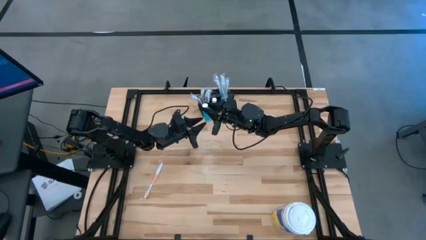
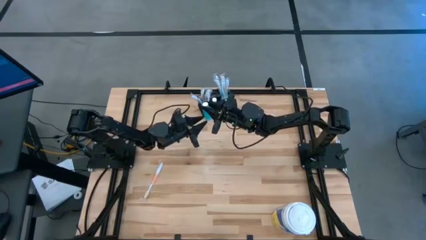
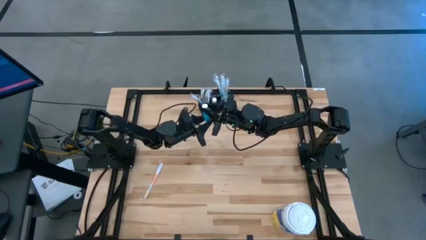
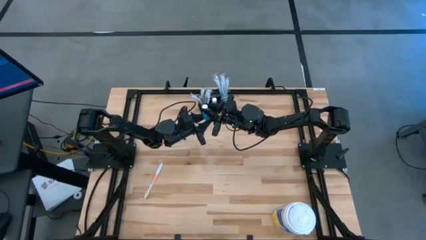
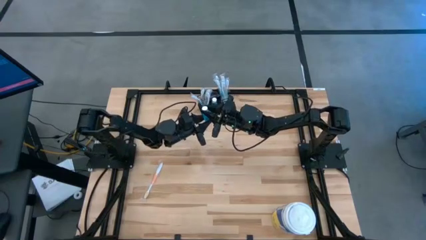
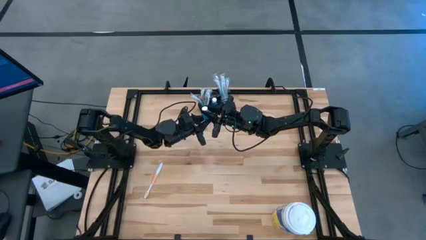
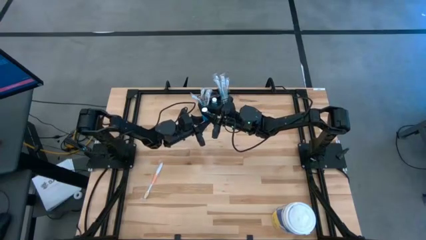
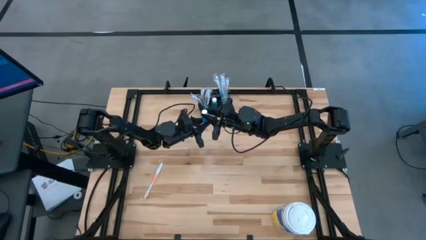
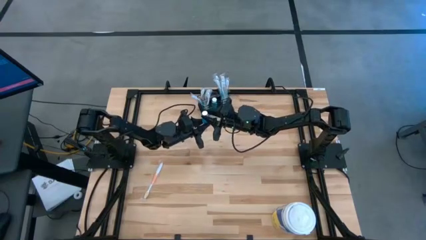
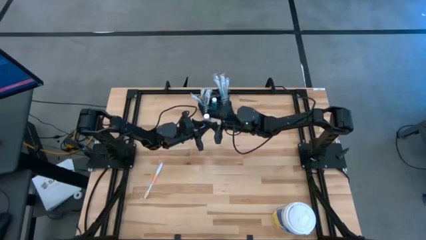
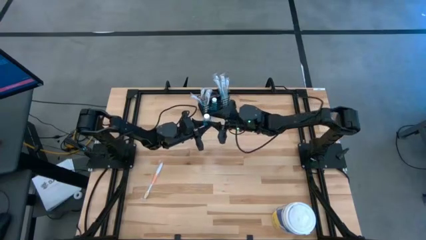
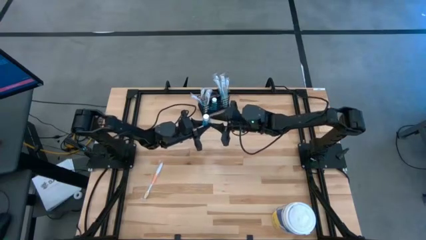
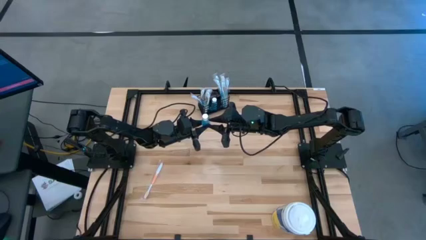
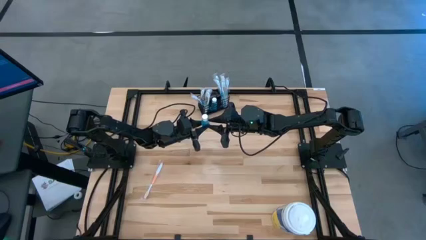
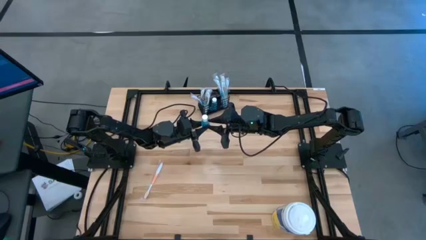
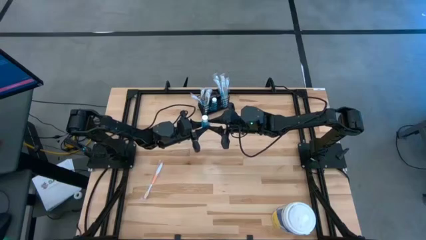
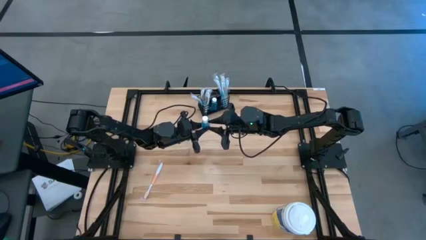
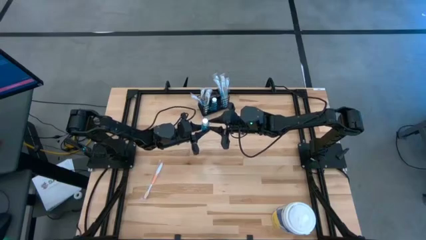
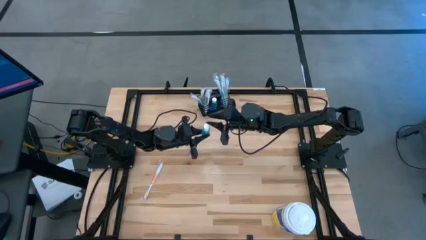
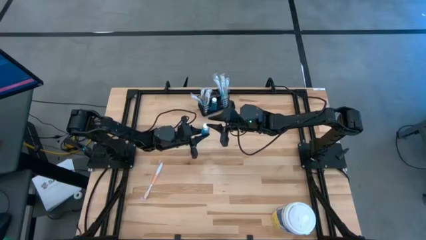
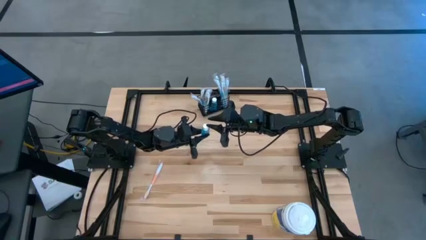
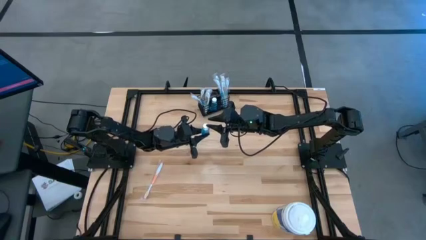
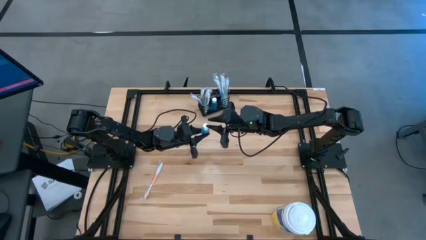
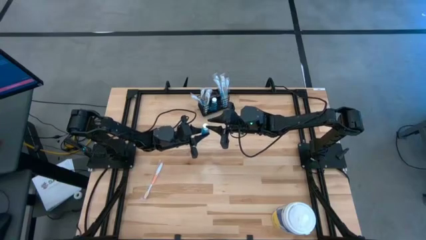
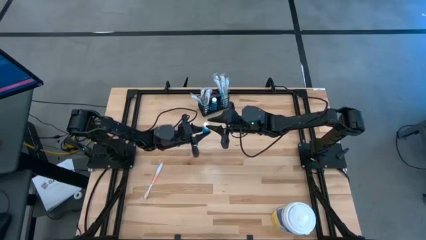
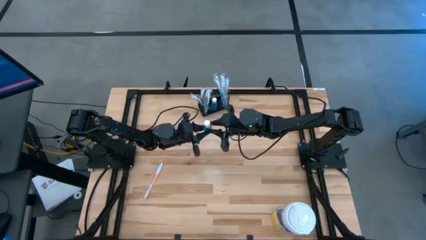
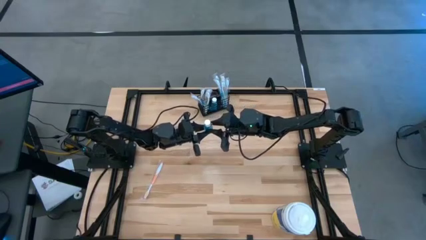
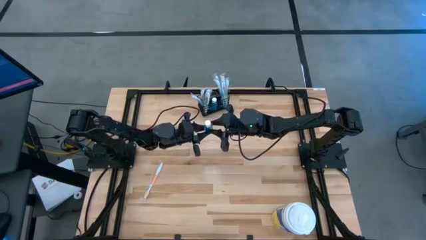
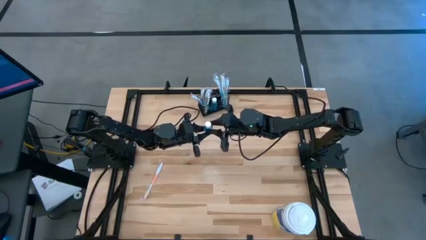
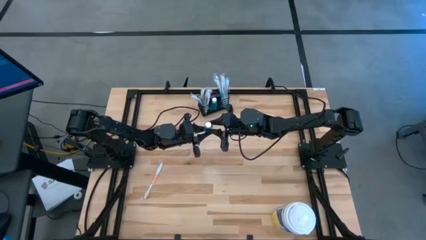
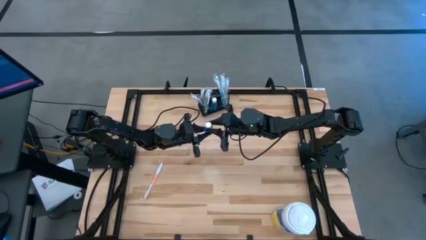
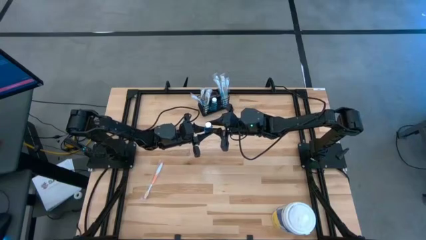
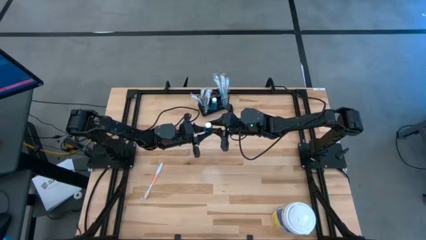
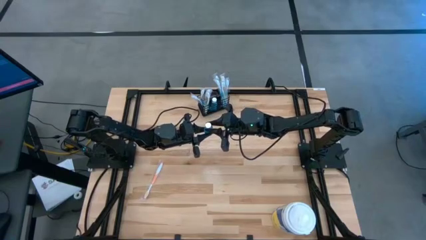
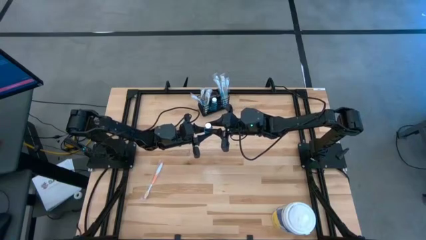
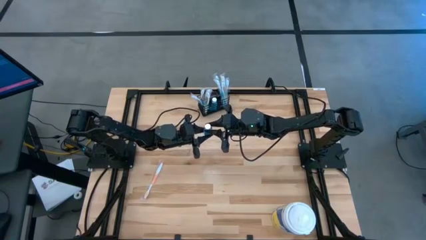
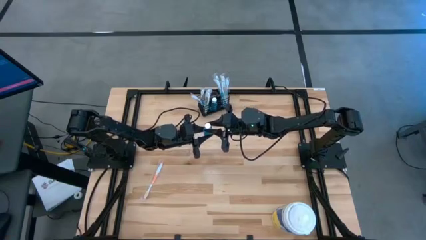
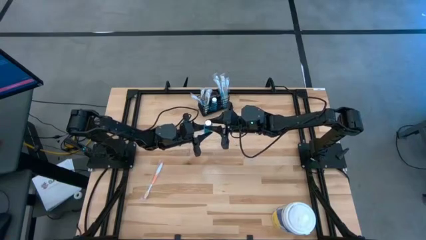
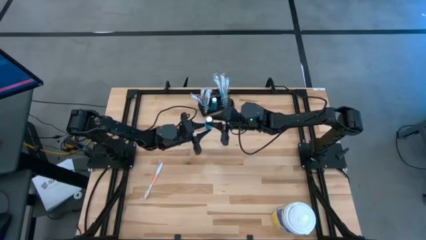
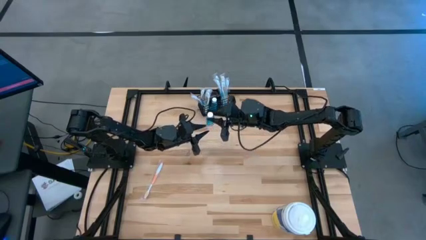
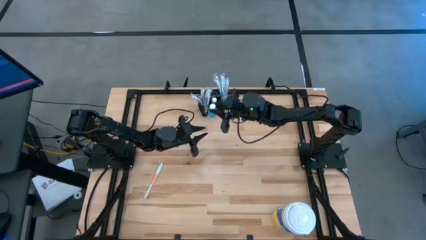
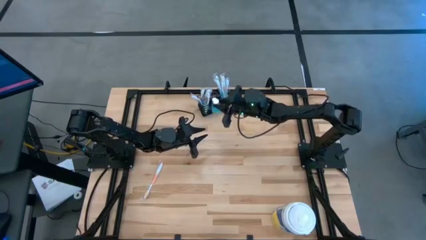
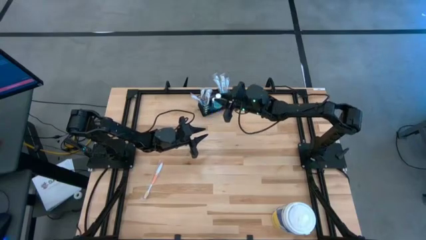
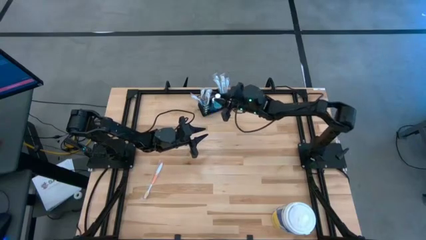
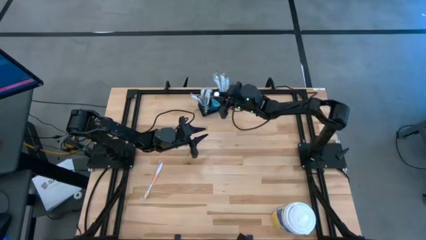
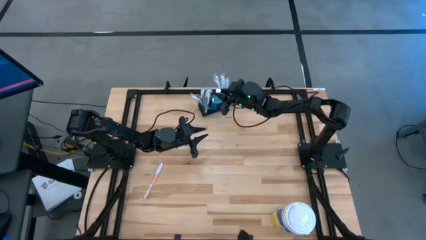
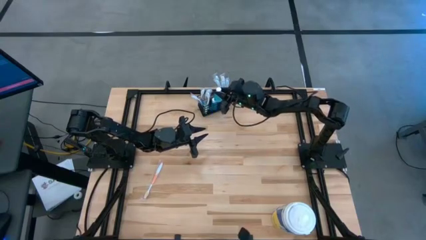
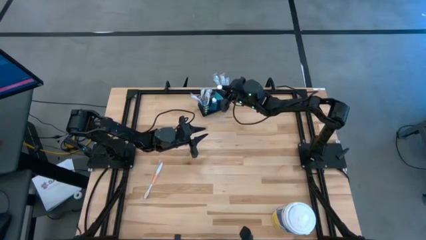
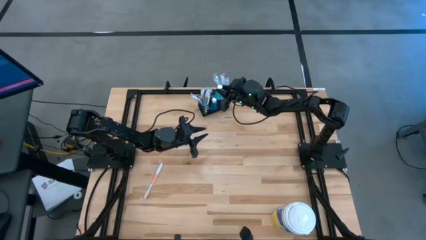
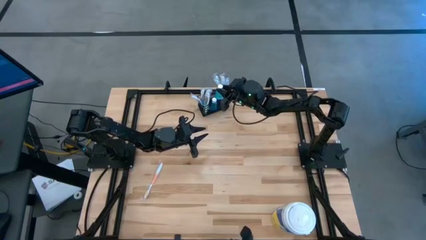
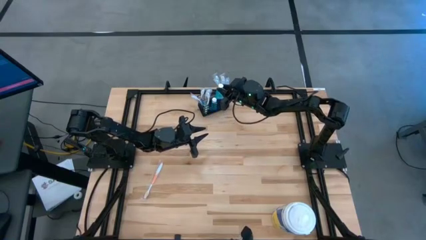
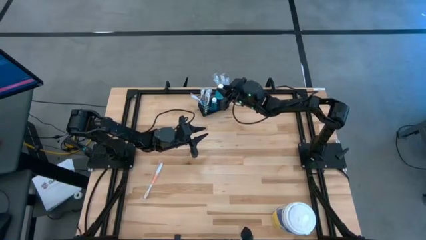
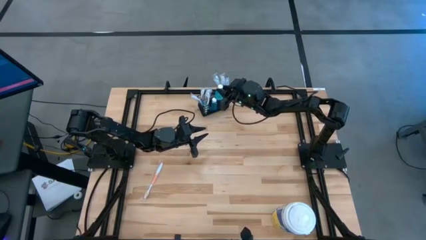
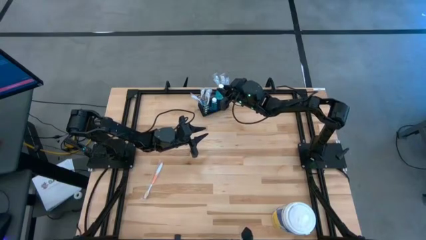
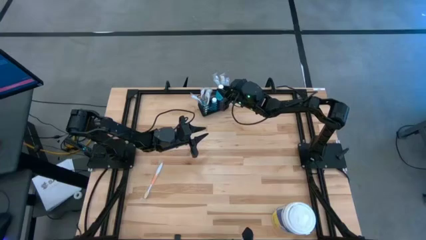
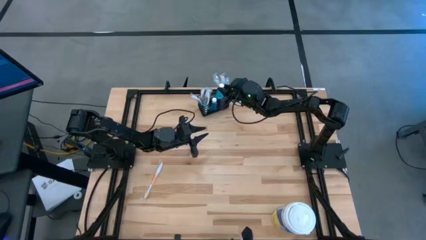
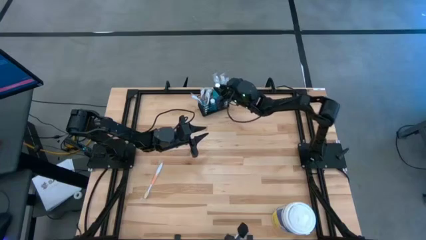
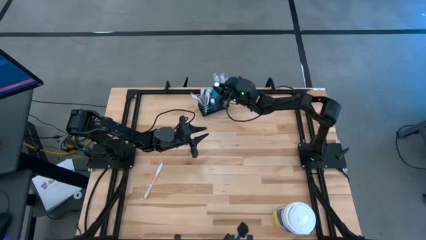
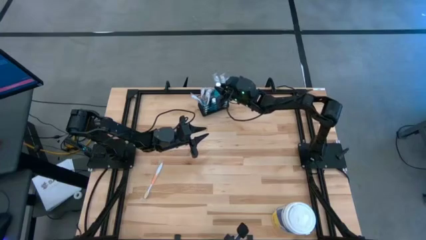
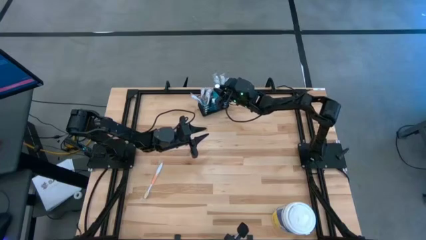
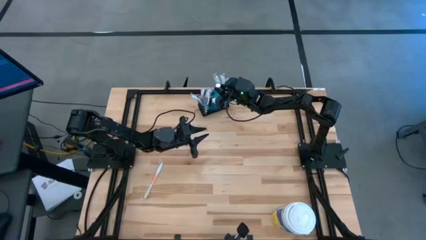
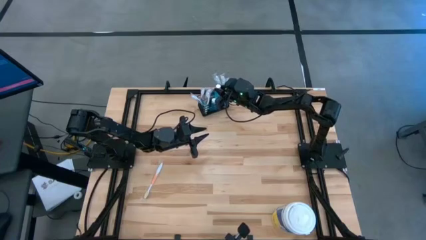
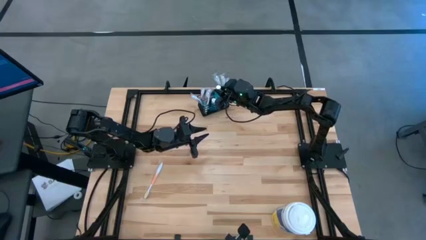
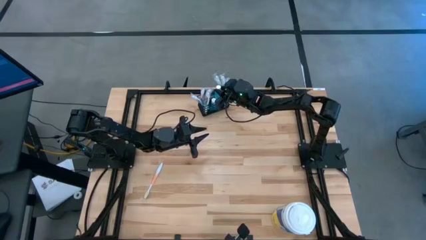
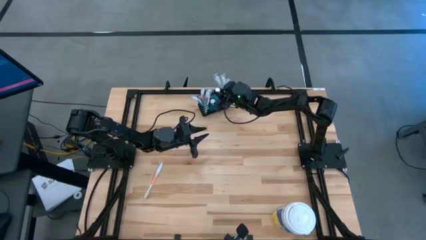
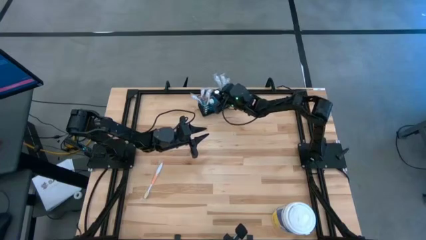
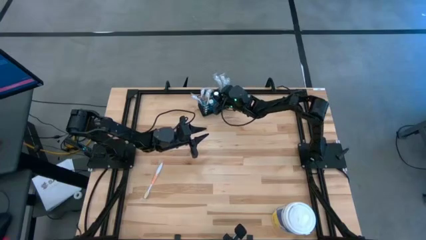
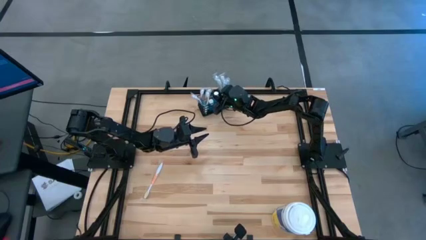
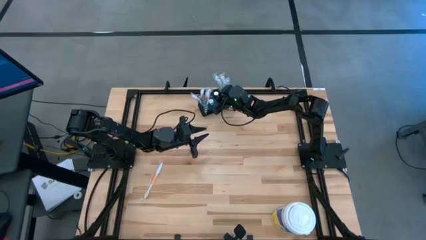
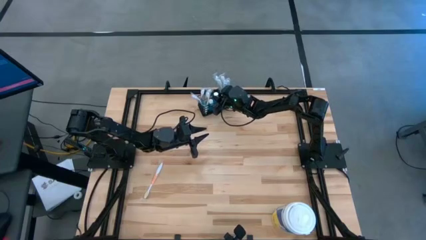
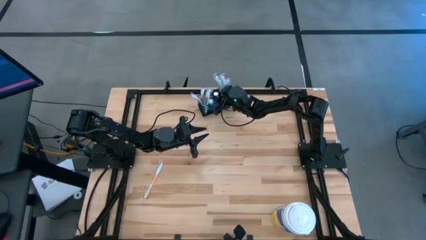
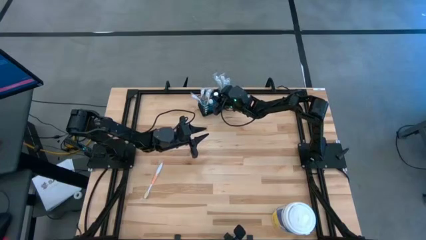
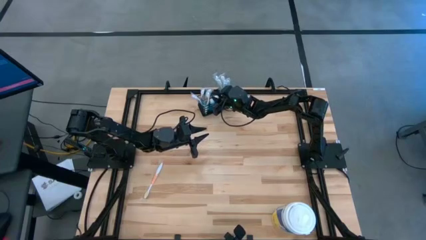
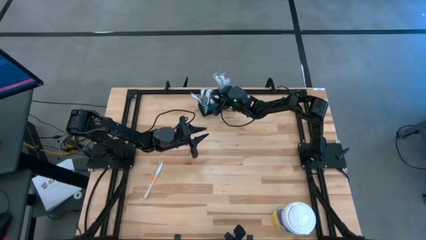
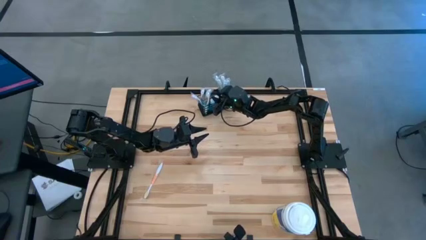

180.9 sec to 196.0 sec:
Task: Pick & Place toothbrushing station
Put the blue mouthwash into the black wire organizer
